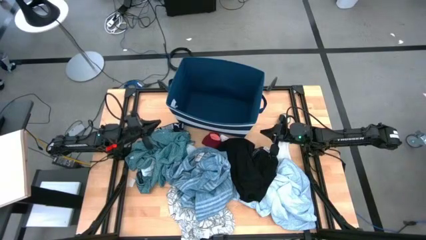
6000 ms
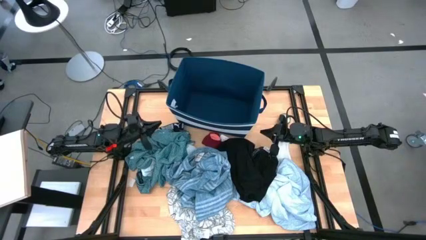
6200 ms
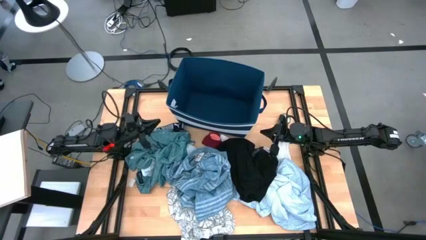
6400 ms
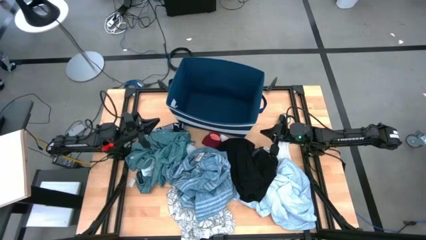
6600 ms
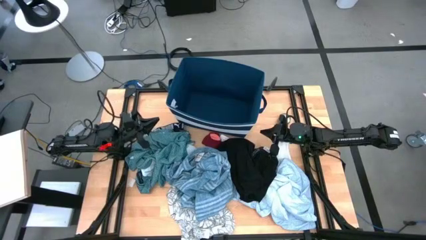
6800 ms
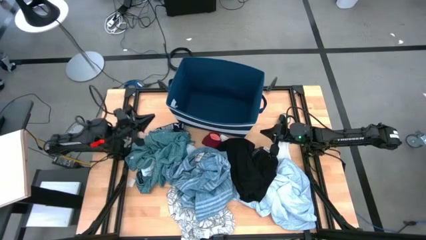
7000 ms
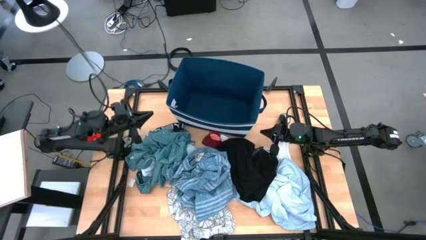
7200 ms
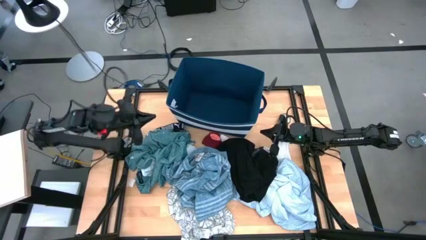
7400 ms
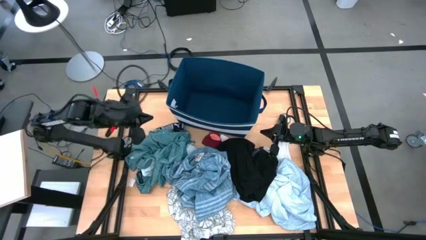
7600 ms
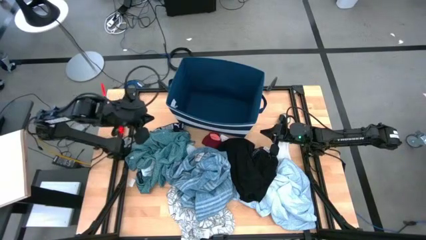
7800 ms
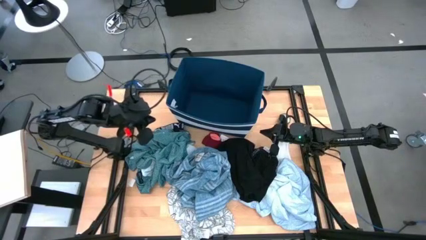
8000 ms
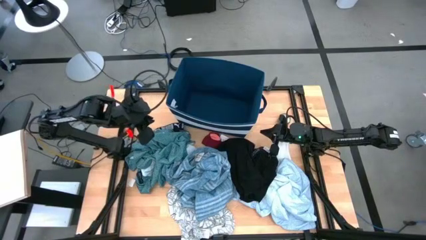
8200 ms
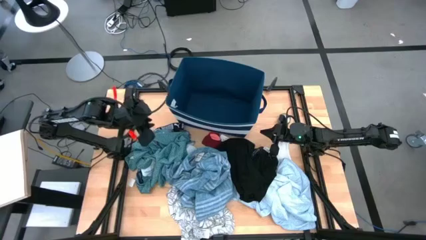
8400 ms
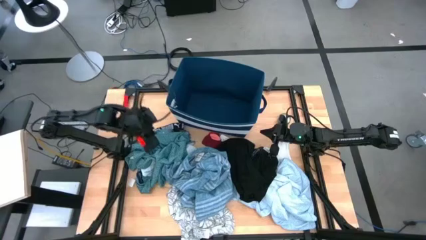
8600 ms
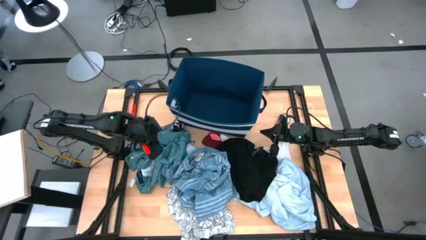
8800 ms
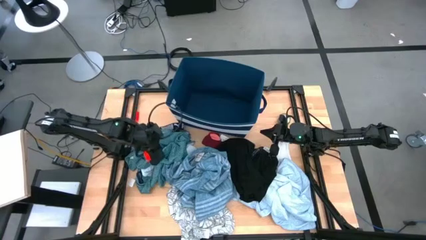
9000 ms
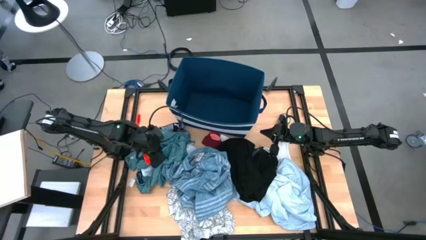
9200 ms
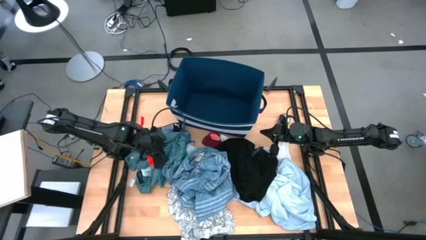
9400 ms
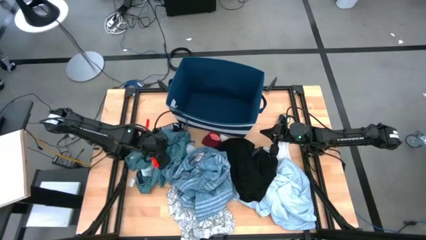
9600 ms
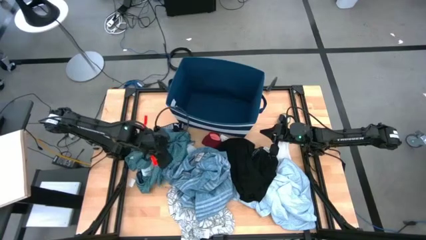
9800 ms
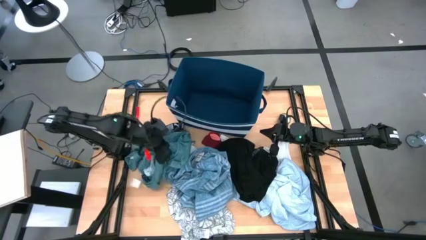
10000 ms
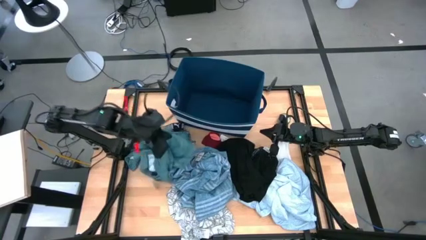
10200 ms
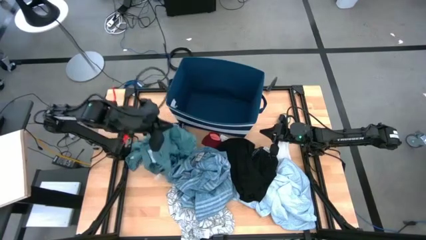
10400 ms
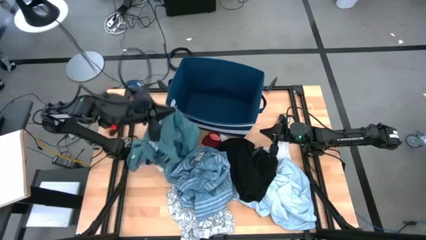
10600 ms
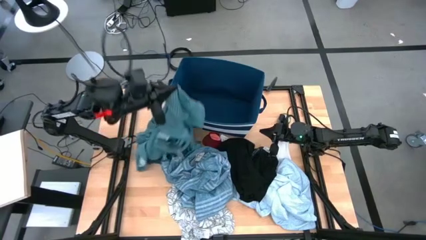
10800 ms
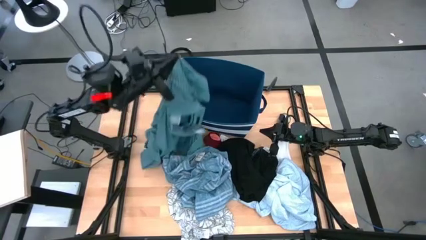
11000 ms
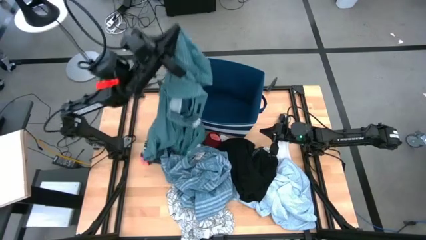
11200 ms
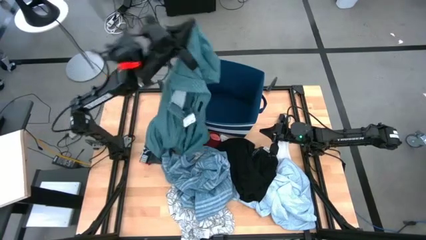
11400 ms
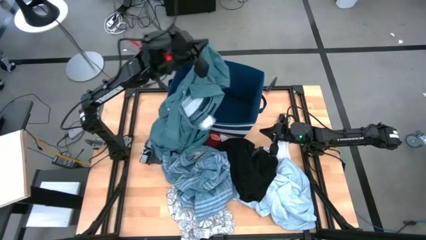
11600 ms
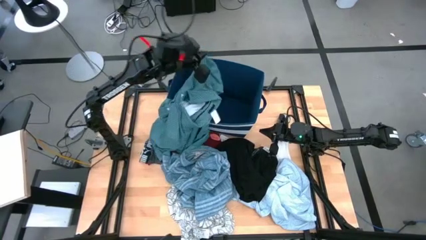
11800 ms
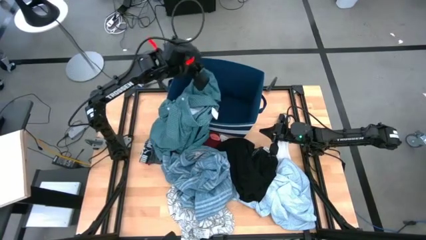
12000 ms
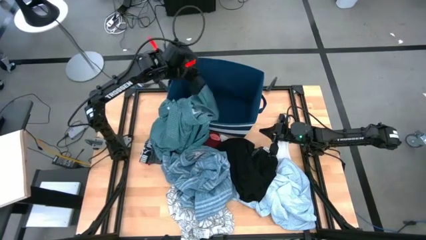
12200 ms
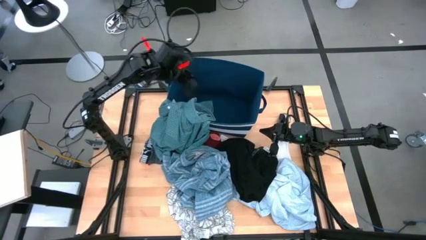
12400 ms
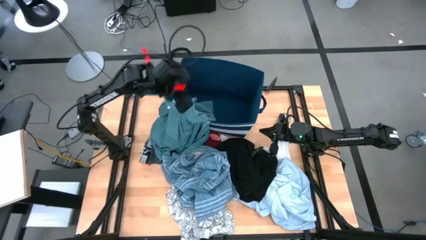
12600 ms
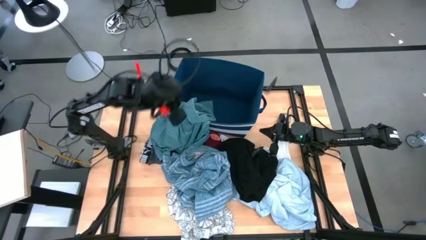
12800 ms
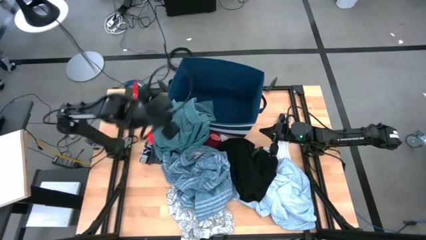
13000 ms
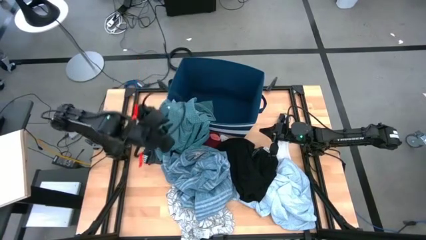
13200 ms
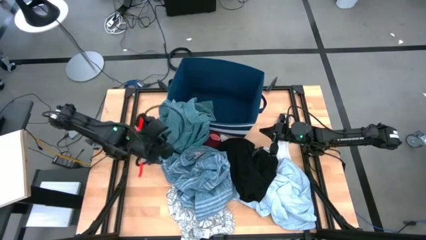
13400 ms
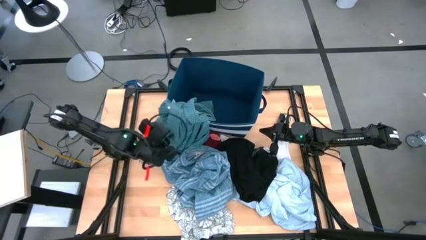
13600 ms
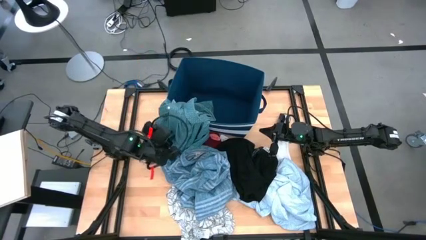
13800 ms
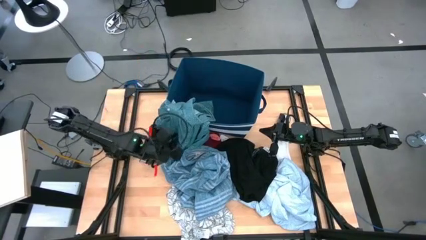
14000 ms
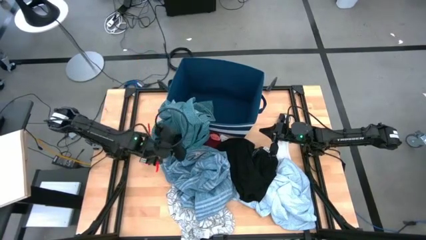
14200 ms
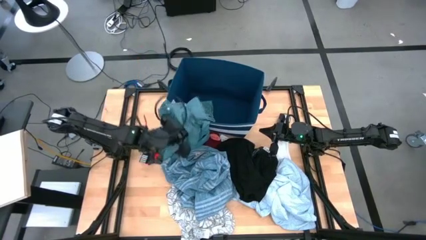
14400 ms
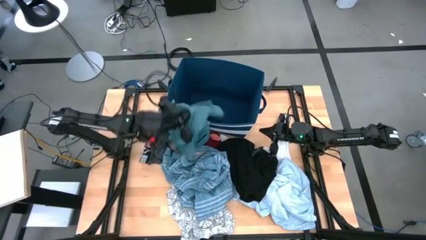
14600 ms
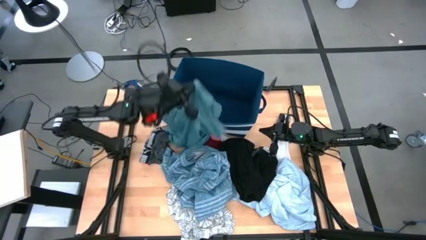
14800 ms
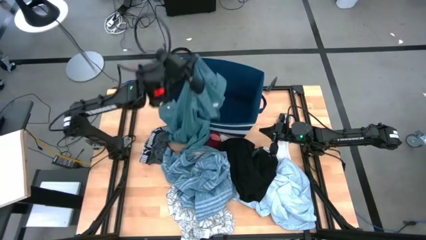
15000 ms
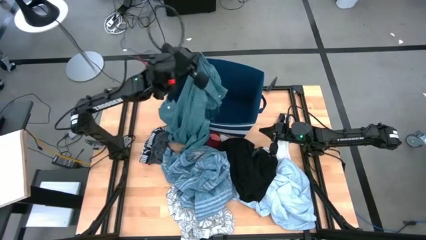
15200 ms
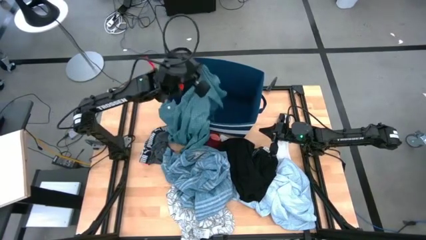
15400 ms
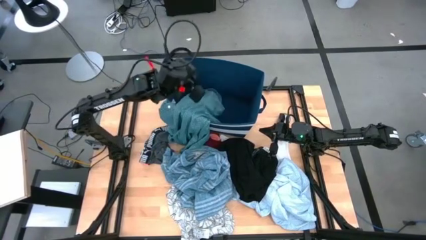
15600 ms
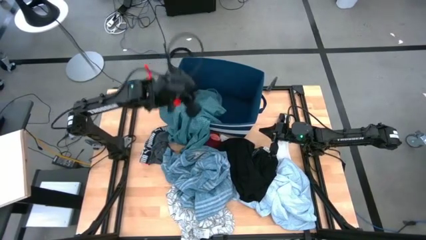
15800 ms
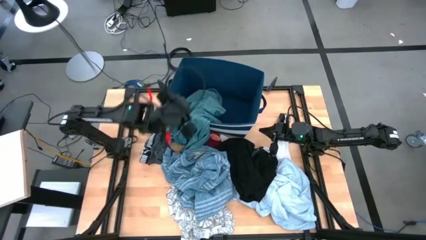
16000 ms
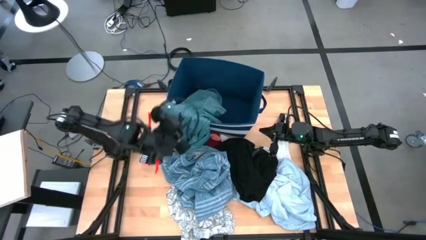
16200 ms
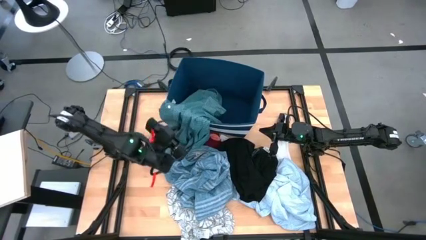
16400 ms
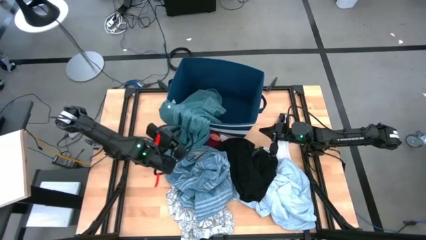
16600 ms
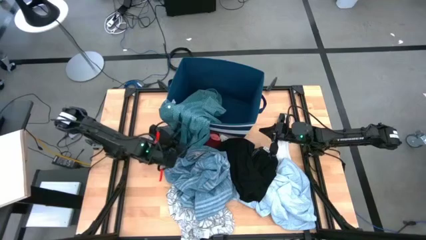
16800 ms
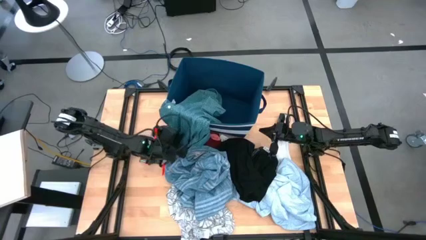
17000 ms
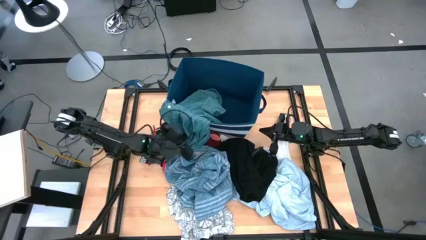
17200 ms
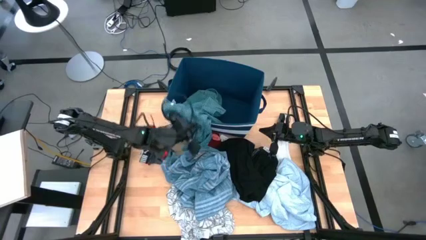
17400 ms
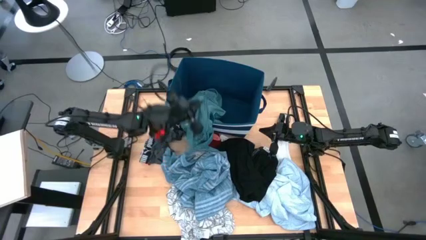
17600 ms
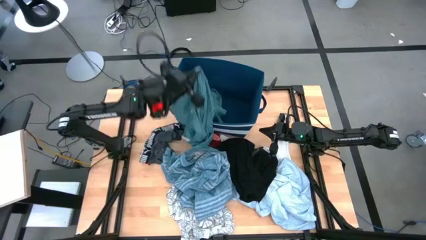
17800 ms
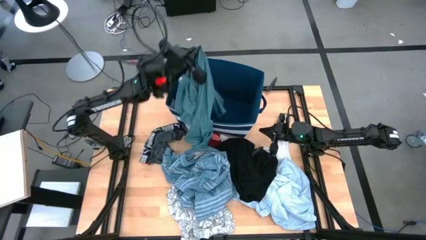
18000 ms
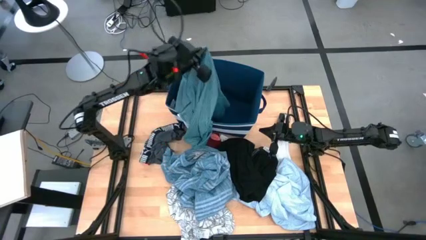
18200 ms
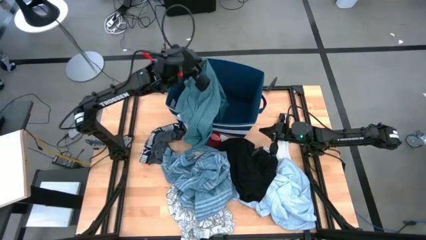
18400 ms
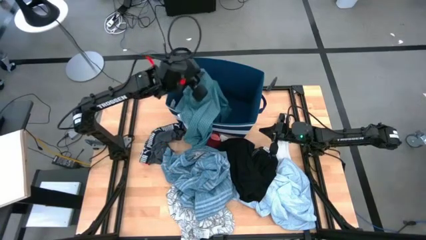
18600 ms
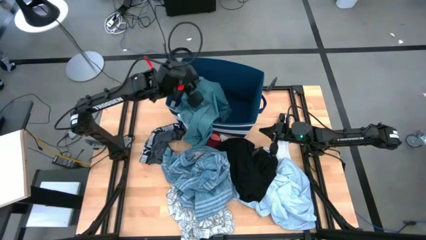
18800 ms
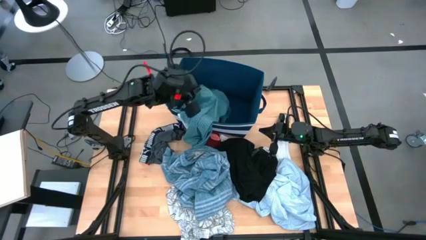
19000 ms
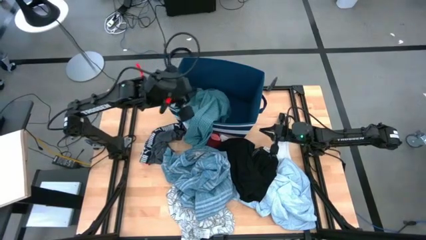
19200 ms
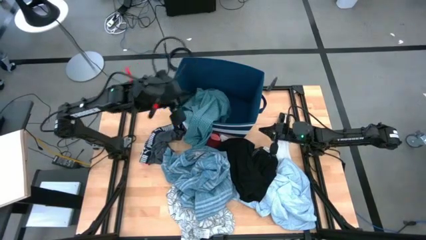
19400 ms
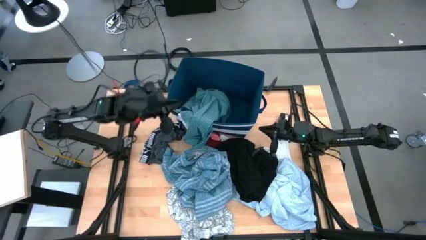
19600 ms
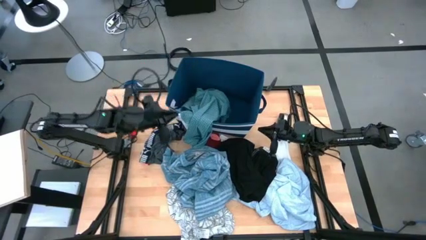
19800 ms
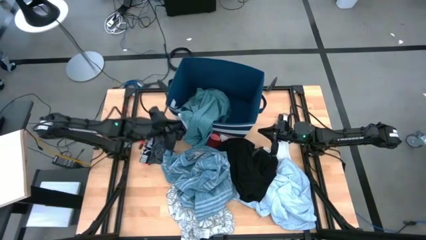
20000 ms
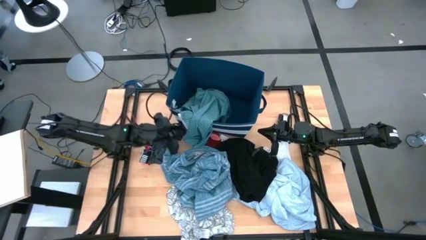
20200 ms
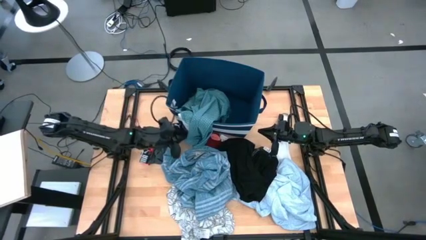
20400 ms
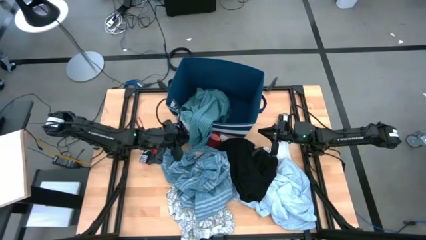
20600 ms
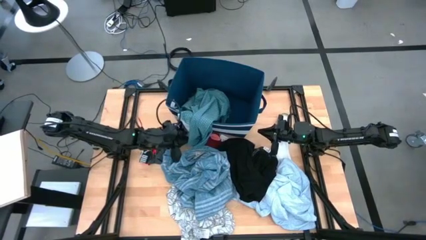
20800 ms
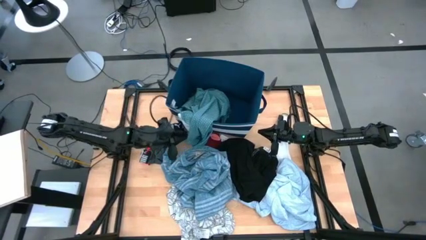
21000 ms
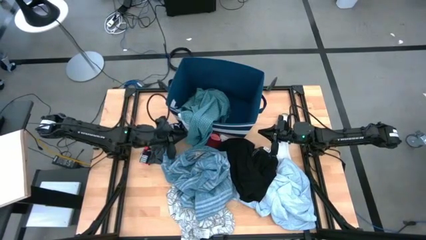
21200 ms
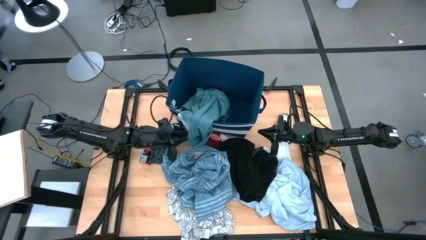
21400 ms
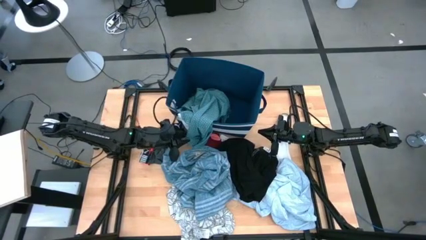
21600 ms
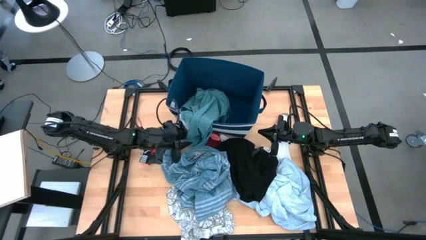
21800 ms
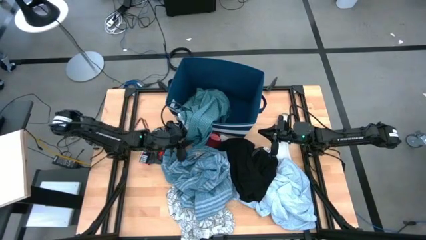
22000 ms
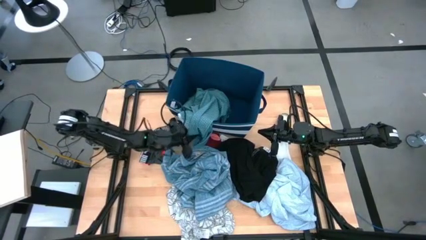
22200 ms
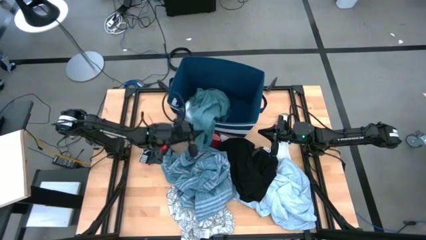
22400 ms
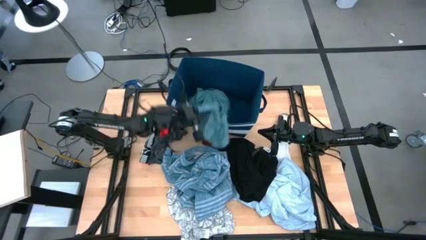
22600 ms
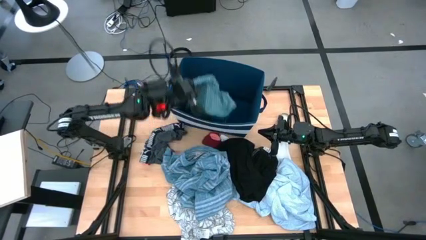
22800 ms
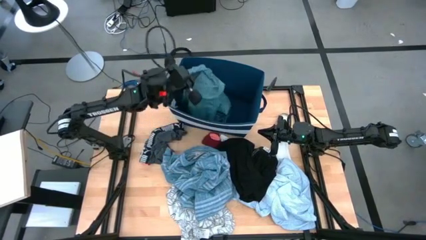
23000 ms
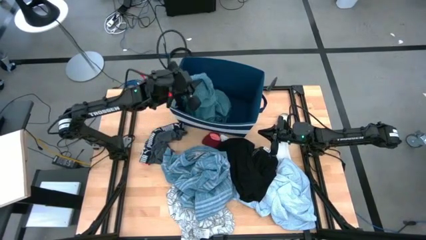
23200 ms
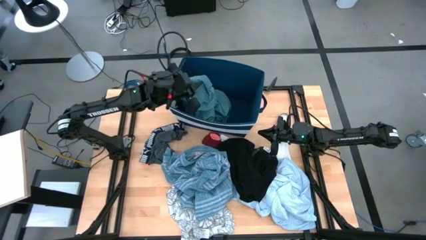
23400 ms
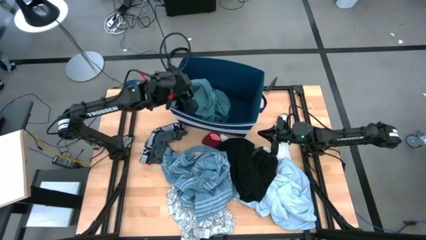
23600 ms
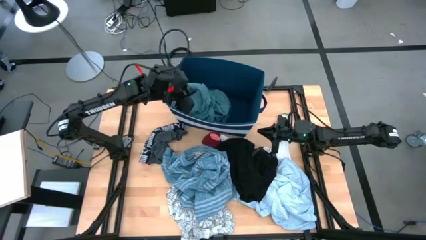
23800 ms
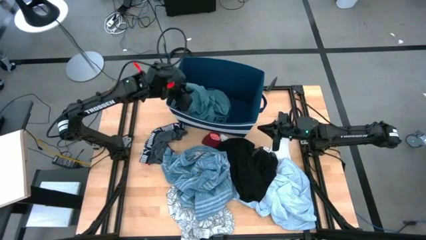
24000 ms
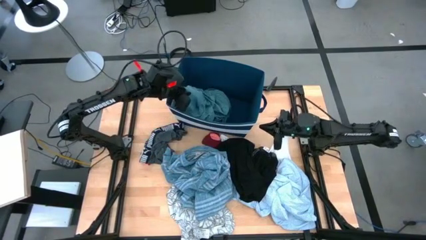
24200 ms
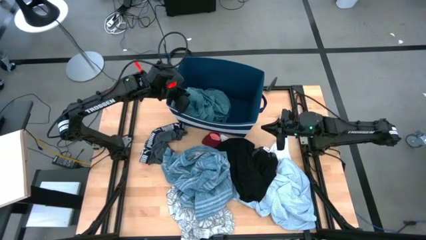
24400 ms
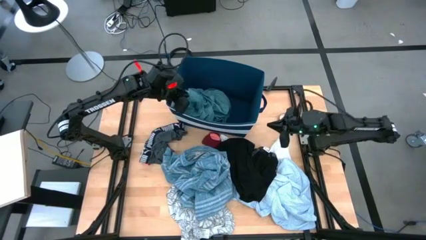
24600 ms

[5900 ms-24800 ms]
Task: Sort clothes
Put the blue, green polo shirt into the blue bin
